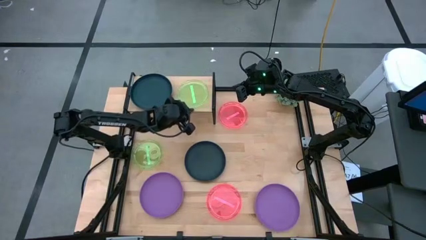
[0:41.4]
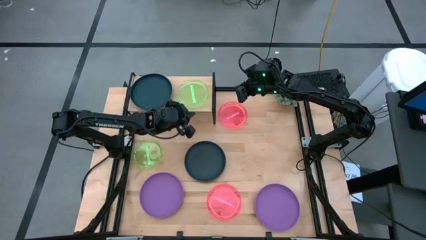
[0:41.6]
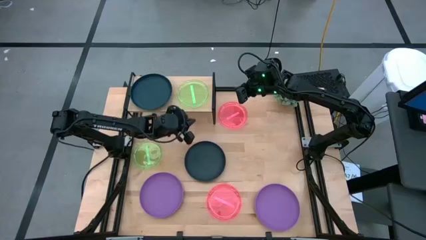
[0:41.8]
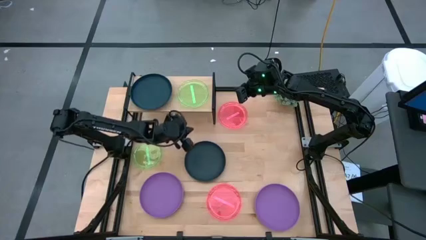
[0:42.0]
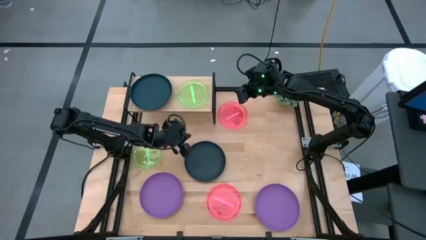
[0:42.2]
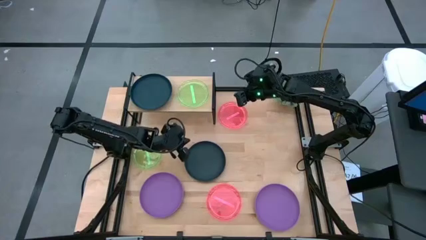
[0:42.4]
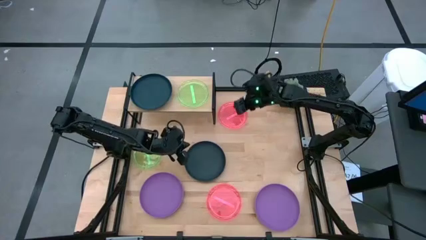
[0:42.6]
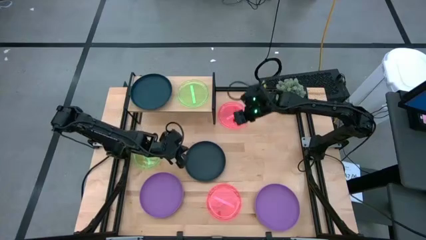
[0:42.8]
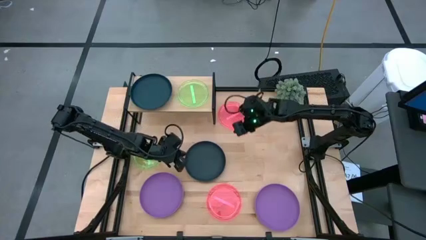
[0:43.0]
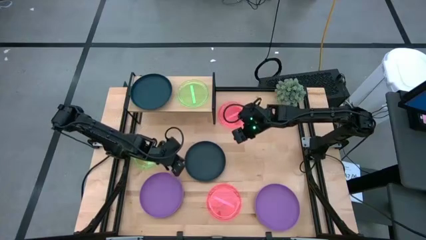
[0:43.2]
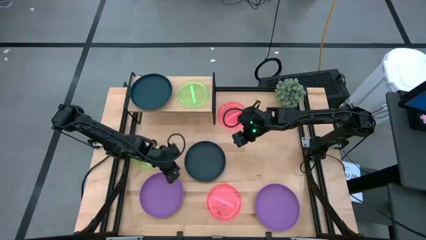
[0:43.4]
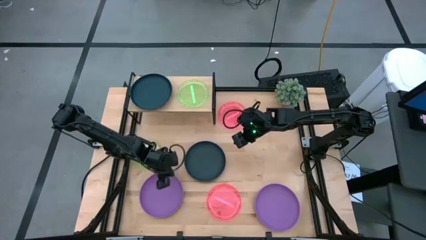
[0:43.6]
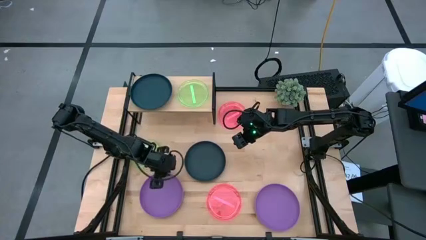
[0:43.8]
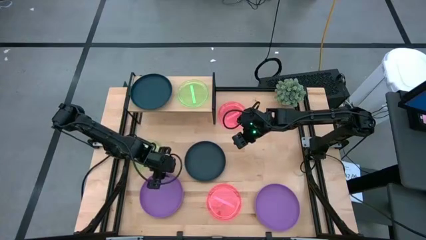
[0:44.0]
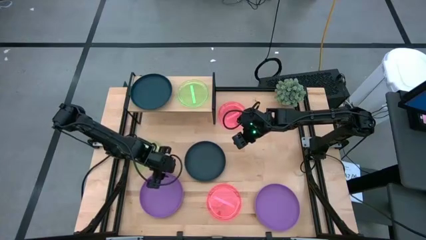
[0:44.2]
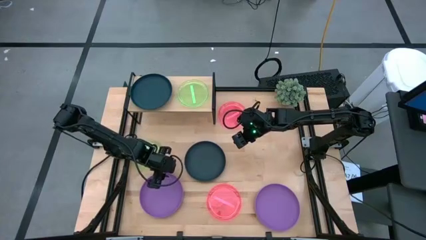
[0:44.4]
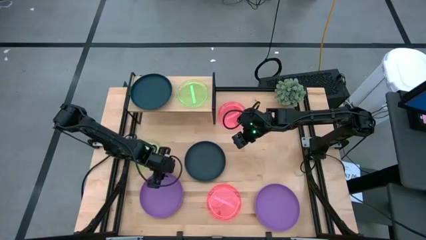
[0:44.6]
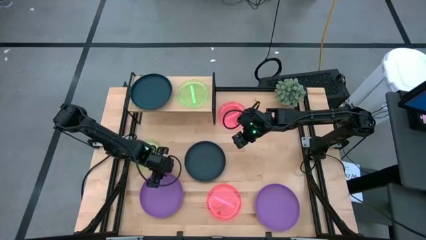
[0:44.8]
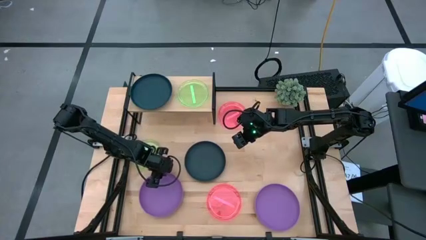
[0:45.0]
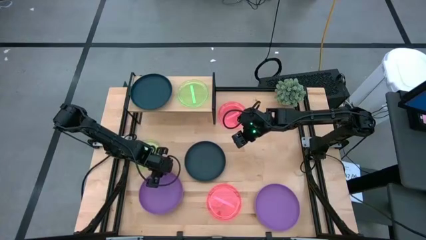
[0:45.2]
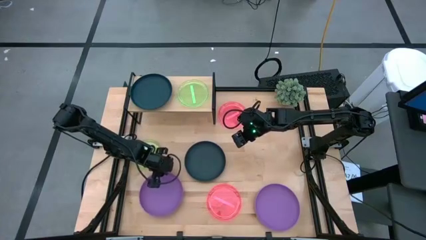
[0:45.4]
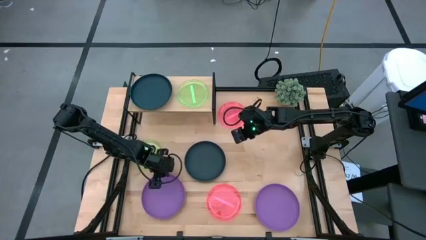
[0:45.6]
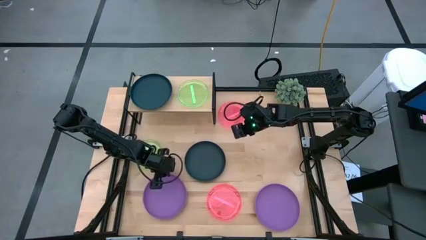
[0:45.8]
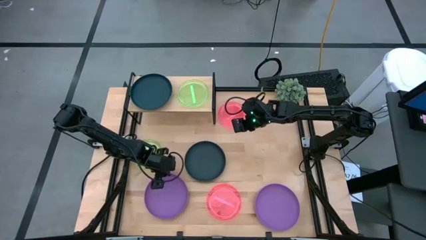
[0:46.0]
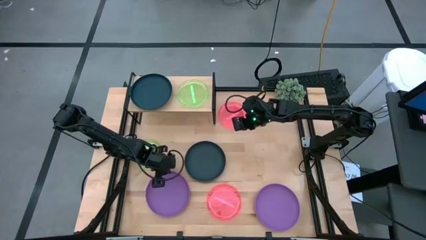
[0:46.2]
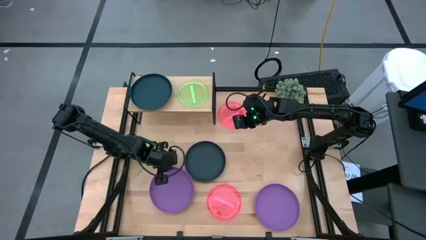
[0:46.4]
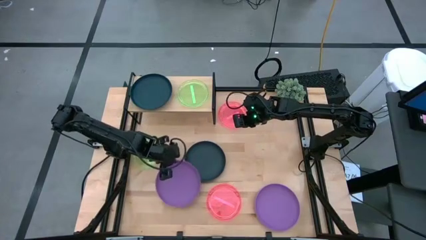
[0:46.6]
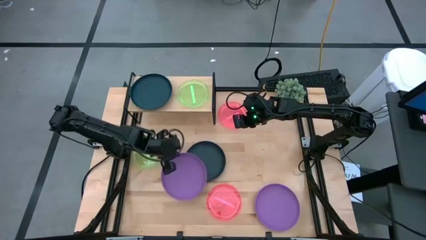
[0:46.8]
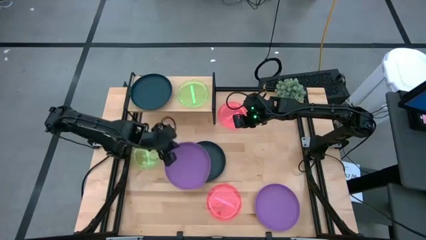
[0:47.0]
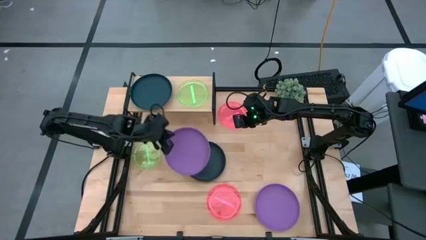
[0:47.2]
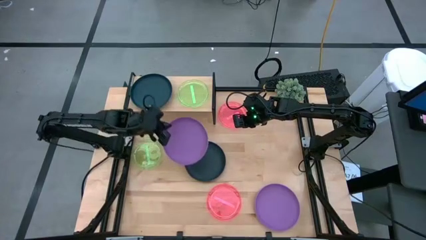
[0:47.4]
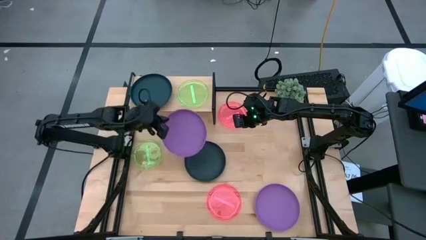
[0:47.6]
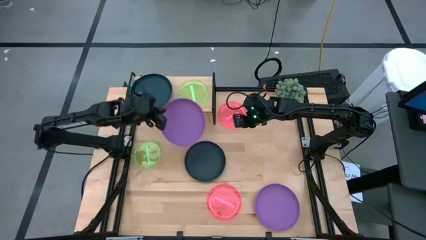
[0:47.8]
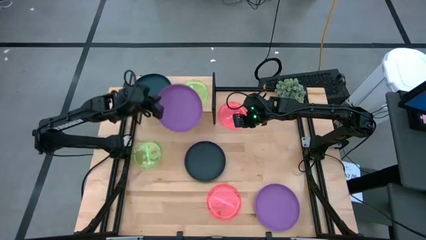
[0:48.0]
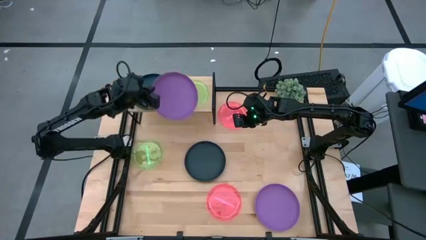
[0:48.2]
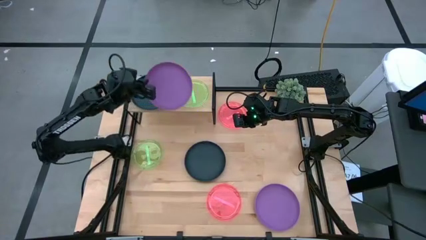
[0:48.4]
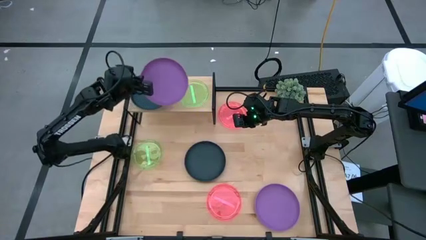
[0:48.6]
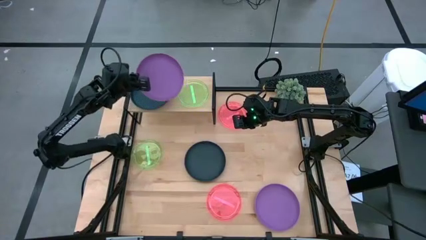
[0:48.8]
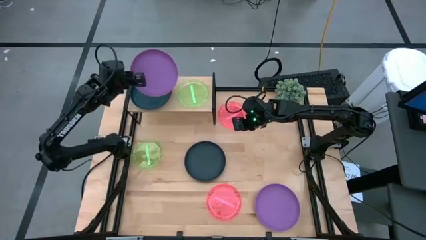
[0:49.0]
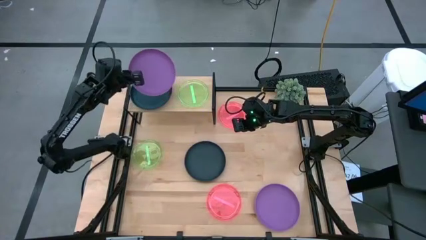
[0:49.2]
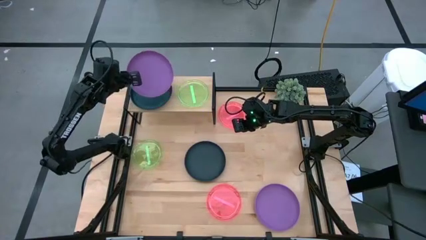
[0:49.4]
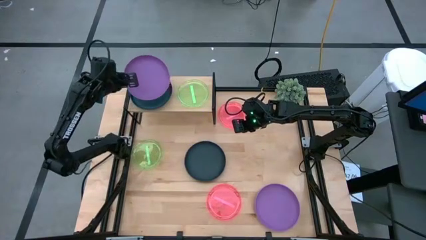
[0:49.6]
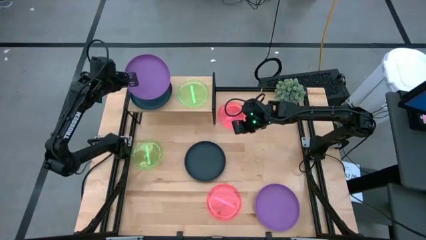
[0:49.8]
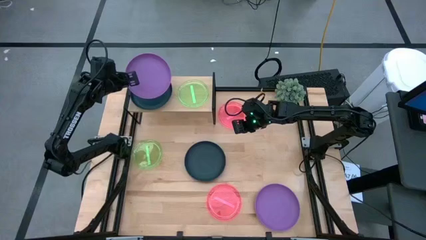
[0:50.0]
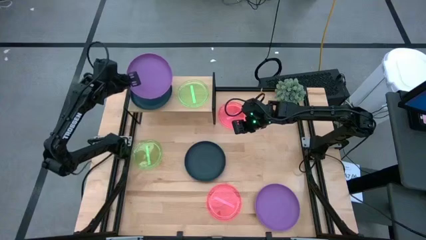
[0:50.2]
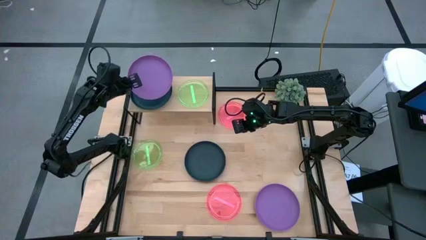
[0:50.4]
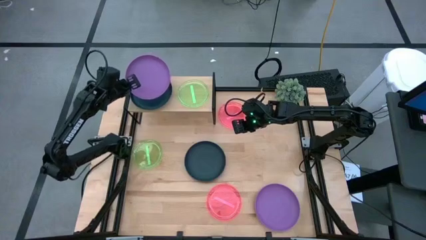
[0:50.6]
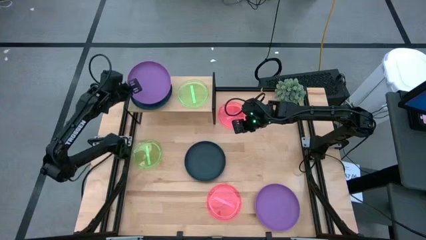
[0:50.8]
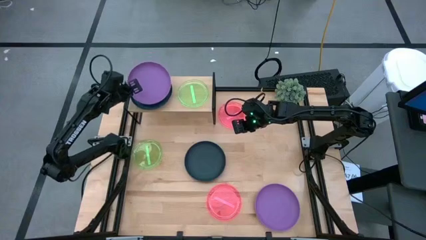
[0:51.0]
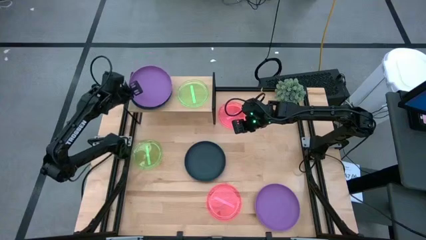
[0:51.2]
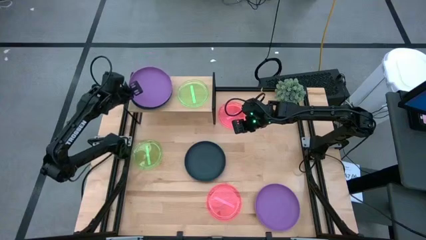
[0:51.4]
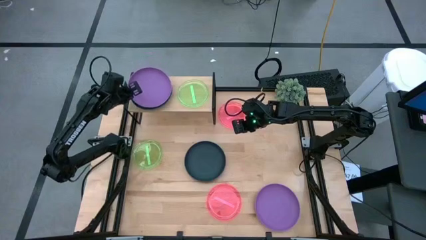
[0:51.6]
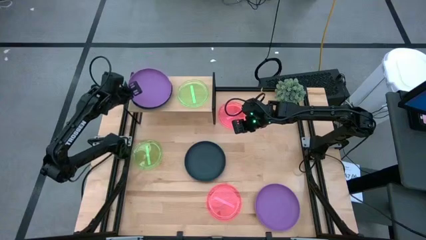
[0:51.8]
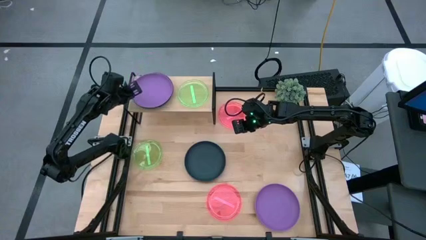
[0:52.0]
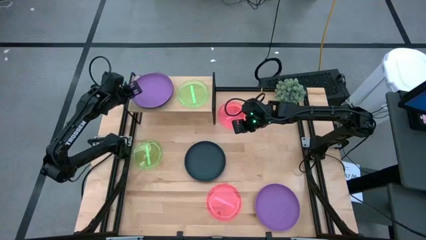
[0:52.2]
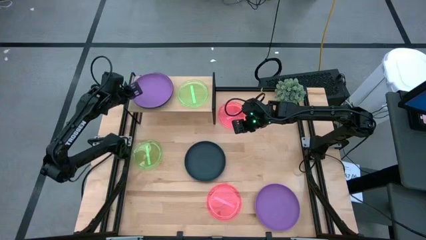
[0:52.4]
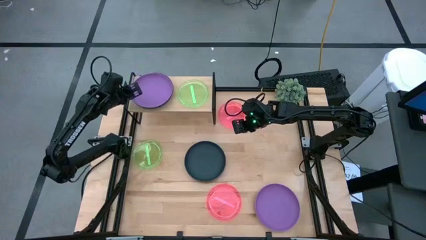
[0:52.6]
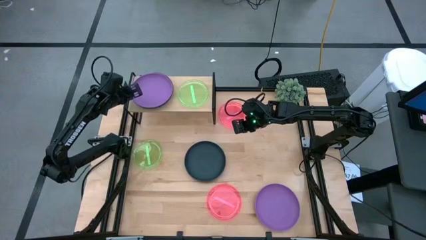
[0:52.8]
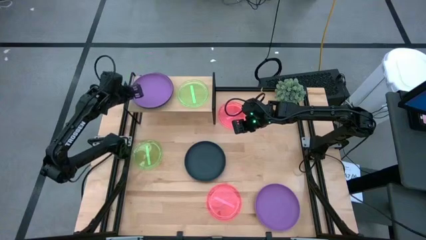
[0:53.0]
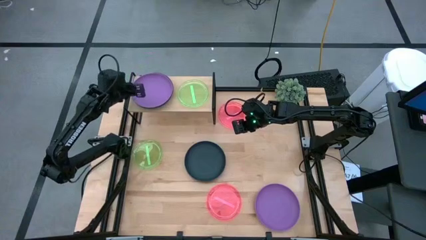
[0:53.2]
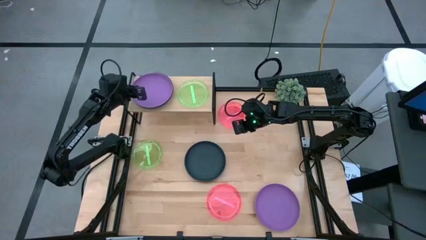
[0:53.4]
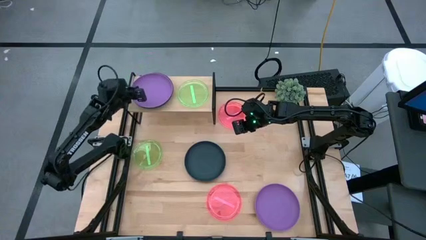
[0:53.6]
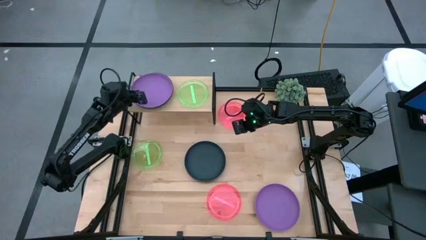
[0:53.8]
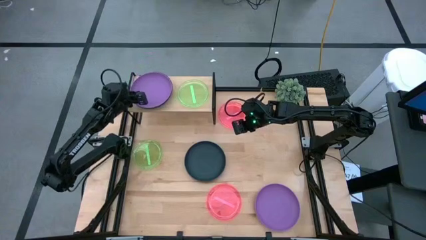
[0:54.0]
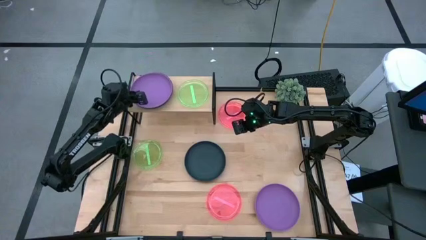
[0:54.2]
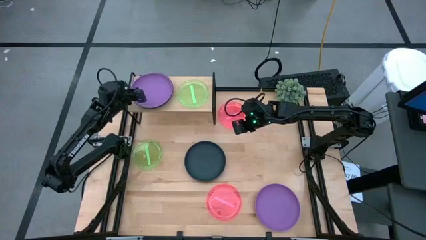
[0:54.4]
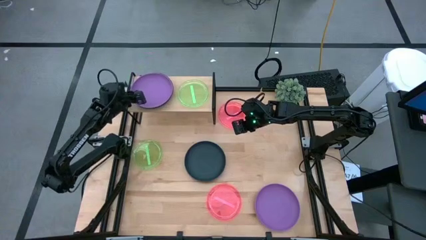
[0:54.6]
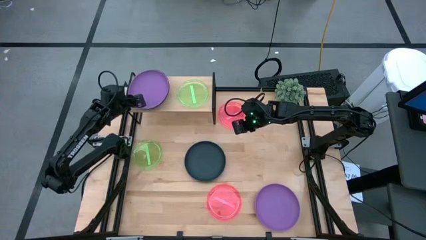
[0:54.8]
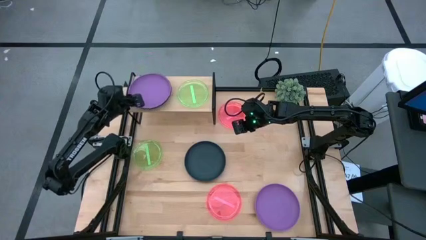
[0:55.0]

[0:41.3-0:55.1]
Task: Place and stack plates onto a shelf
Stack the left purple plate on the dark blue plate

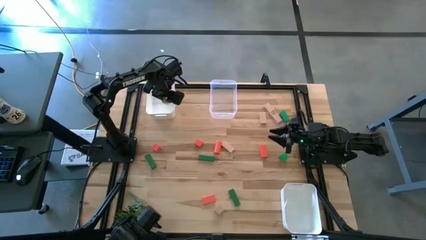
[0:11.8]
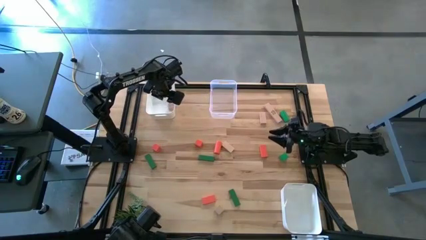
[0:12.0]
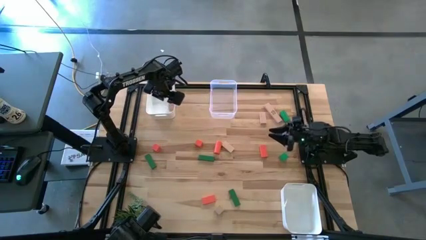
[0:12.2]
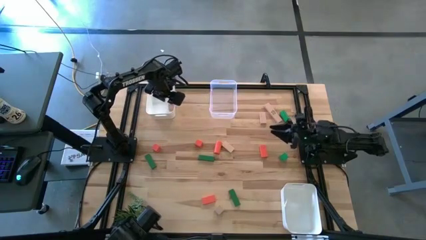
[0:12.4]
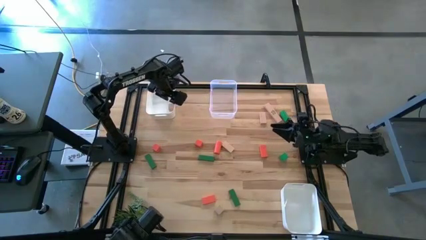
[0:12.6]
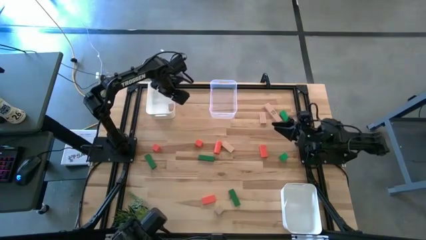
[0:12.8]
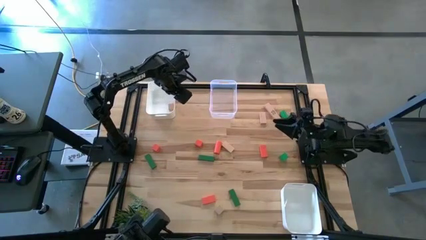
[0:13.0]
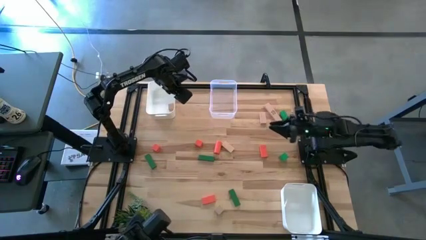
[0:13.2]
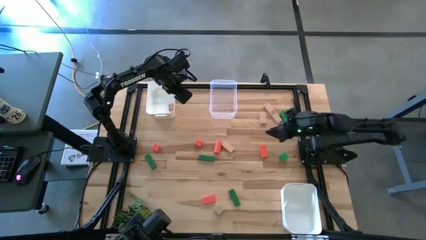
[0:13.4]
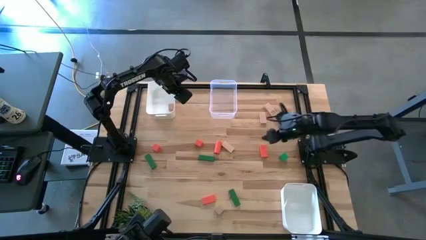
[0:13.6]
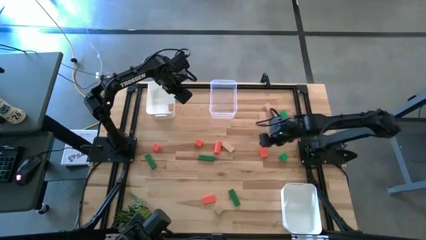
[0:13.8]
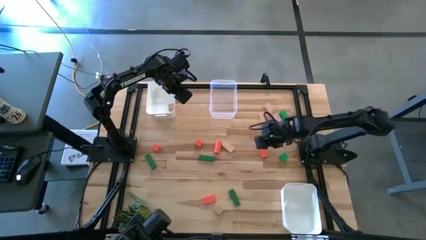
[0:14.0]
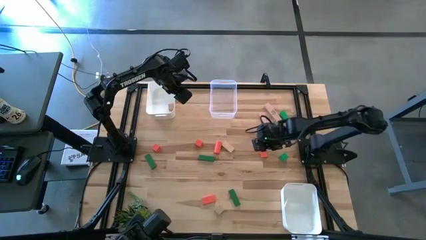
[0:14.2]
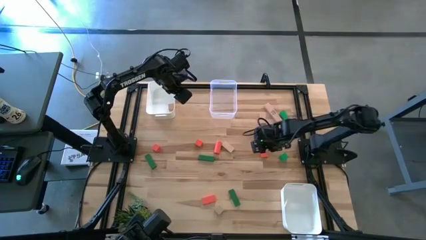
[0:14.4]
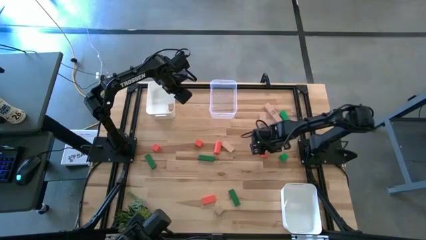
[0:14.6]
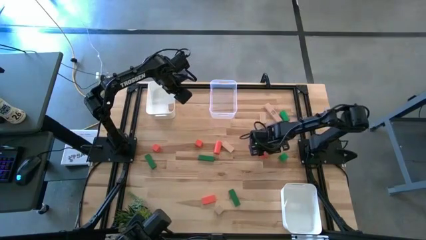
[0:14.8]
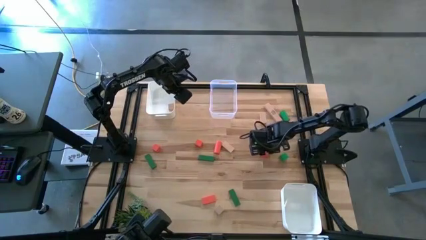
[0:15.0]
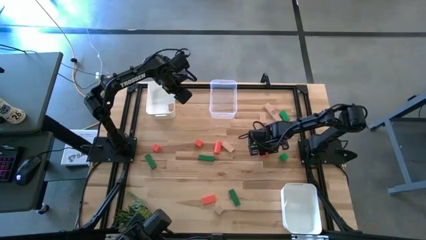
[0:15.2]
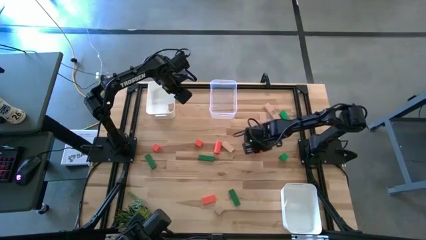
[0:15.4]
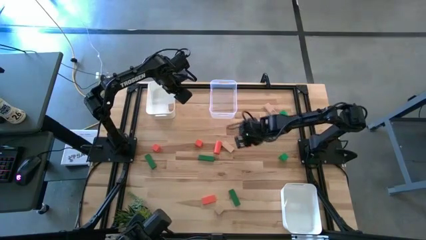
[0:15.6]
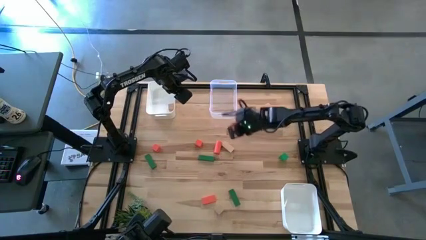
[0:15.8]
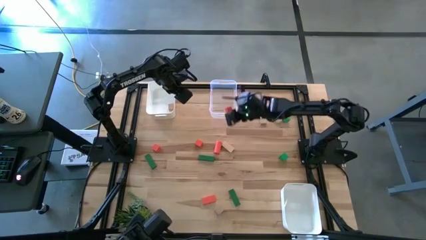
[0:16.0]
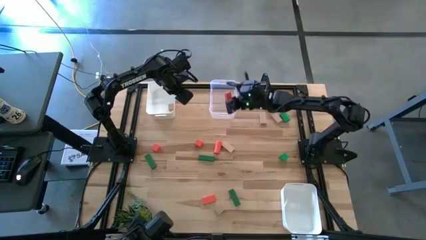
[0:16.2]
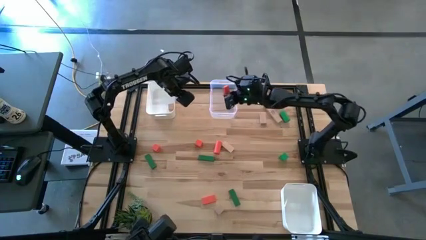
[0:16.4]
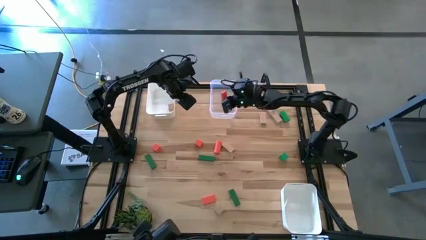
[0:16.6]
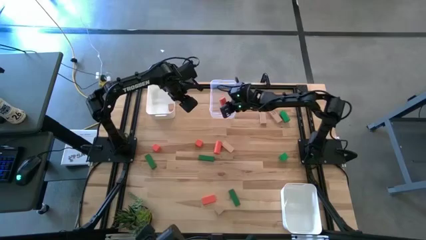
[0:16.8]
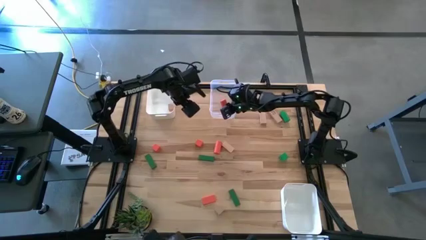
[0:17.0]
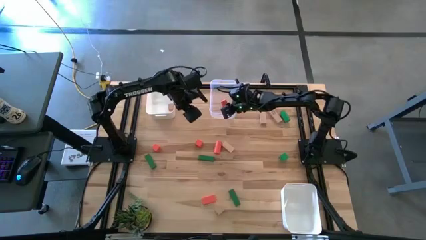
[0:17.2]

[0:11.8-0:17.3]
Task: Sort & place blocks by color
Put the orange block into the transparent bin
